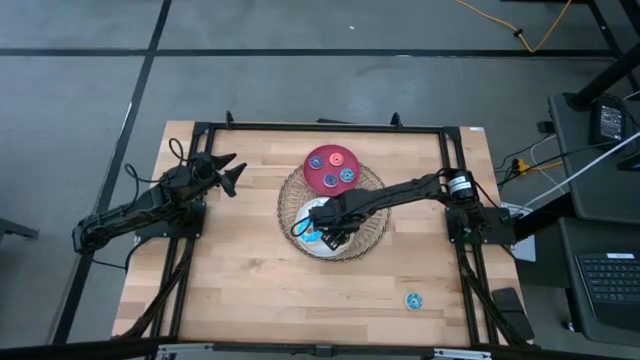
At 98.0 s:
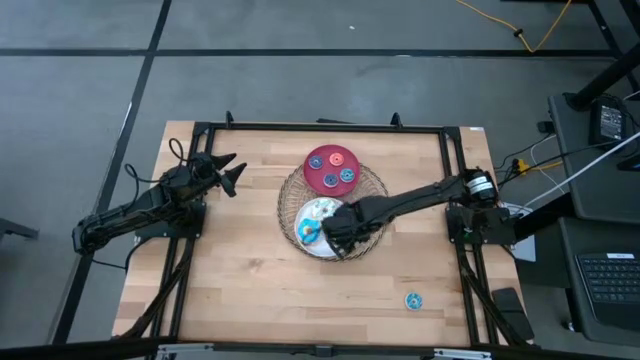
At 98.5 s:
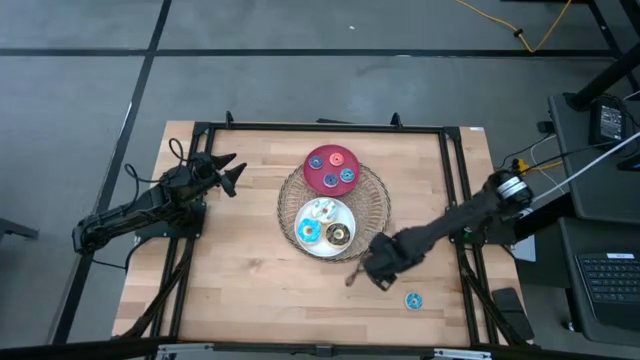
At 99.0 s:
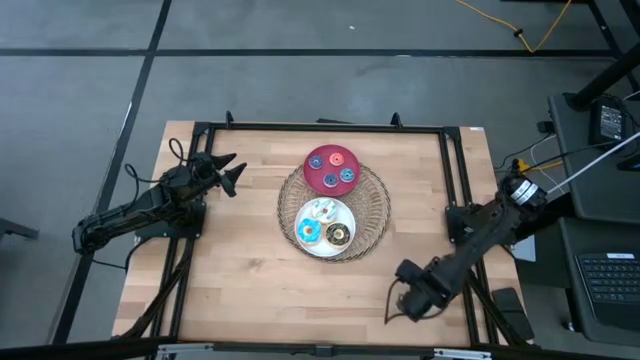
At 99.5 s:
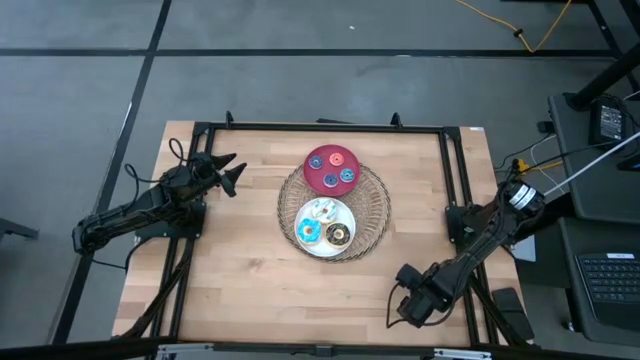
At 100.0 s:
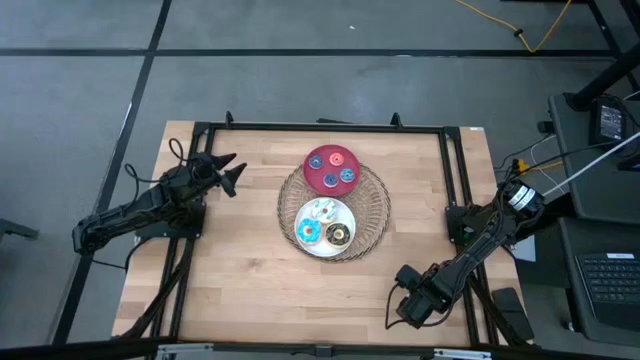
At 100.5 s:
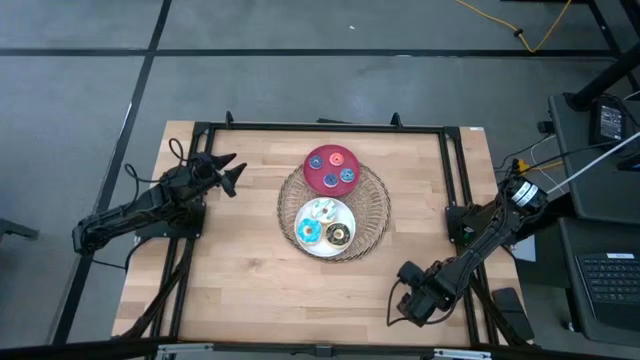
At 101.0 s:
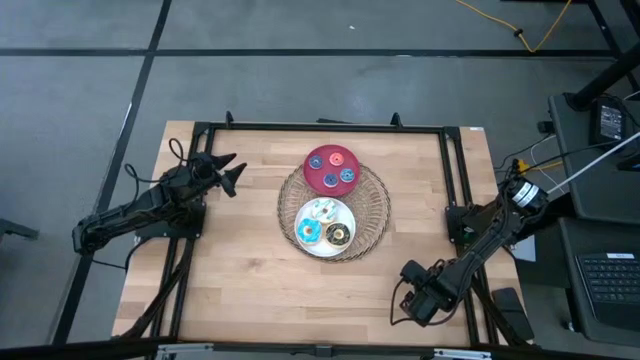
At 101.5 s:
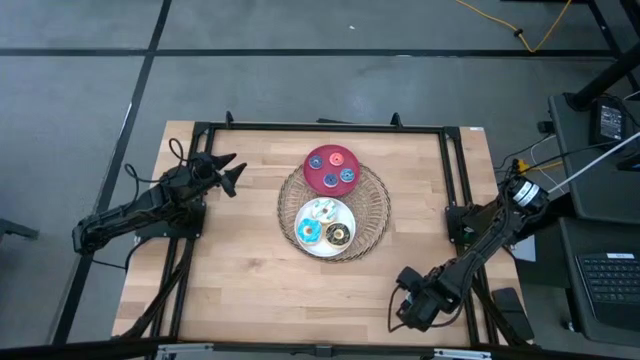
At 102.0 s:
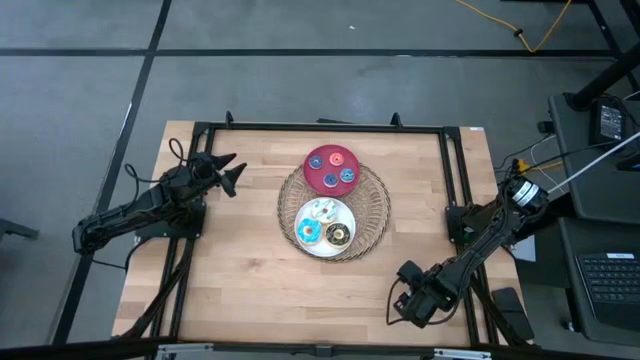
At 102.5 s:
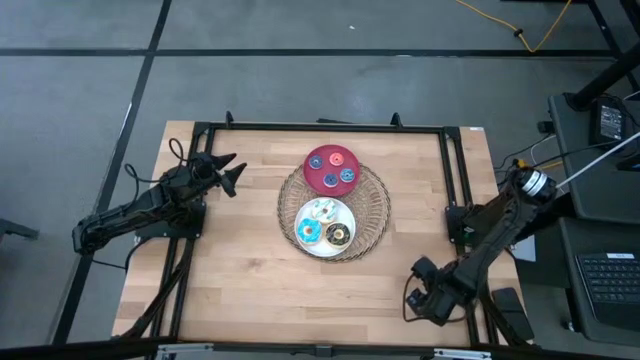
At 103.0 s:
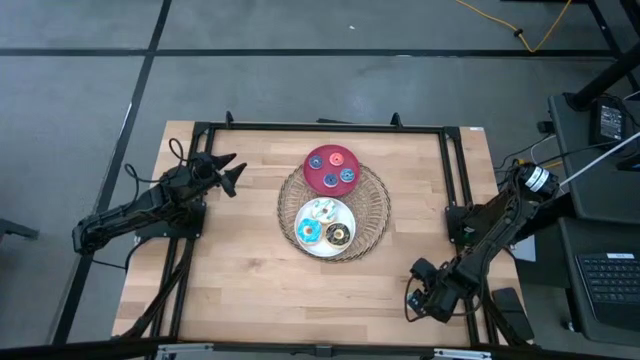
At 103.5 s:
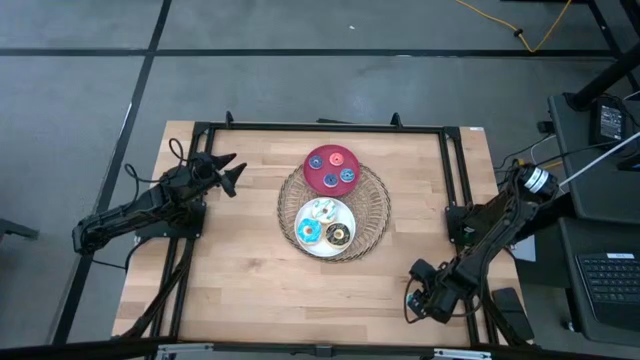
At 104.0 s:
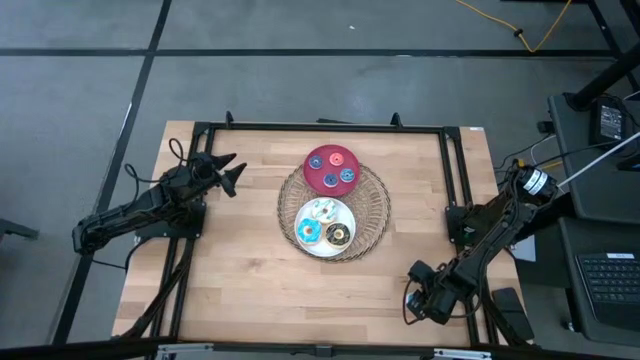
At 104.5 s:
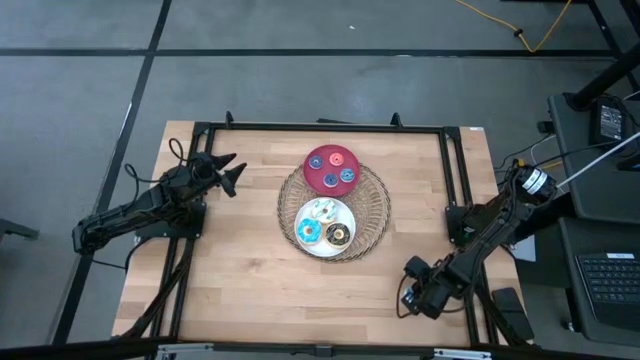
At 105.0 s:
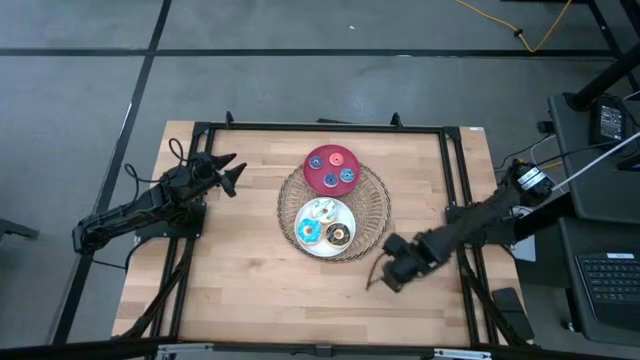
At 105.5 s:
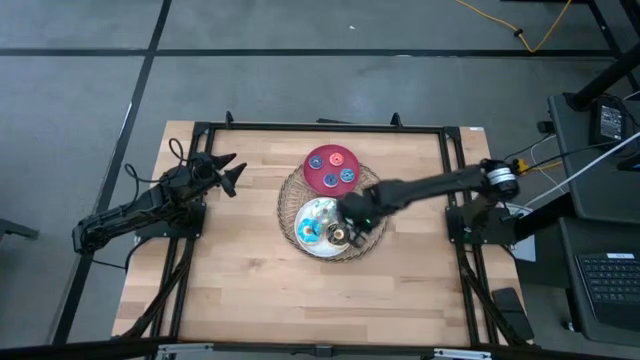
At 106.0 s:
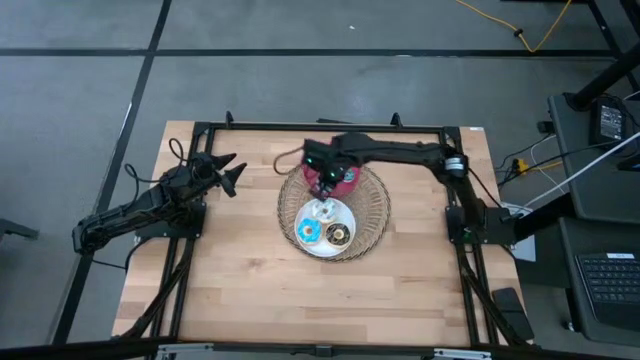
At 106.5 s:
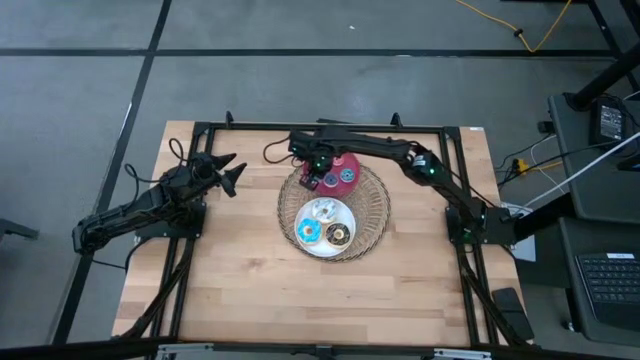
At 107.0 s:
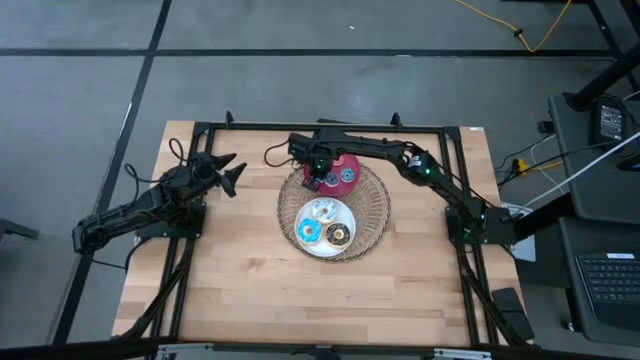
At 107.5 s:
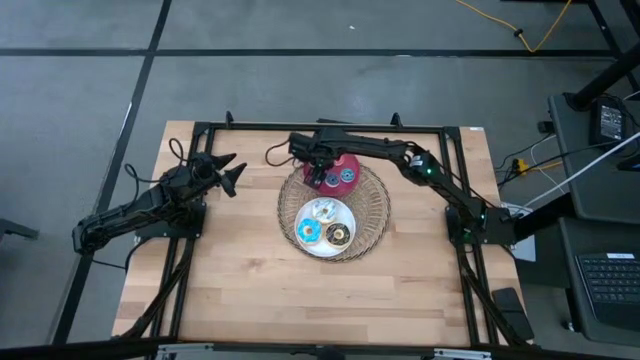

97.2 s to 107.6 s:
Task: Pick & Place donuts
Put the small light blue donut on the red plate

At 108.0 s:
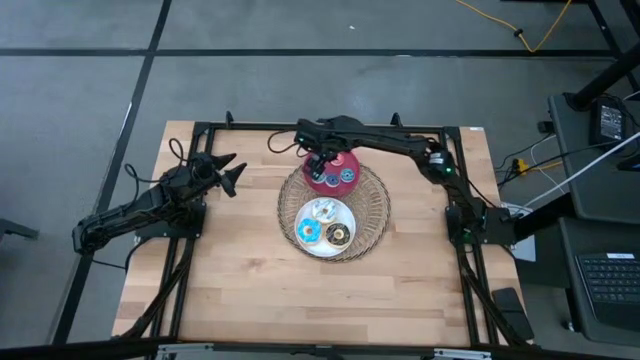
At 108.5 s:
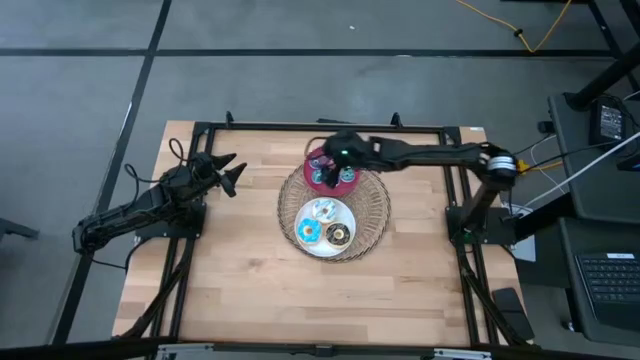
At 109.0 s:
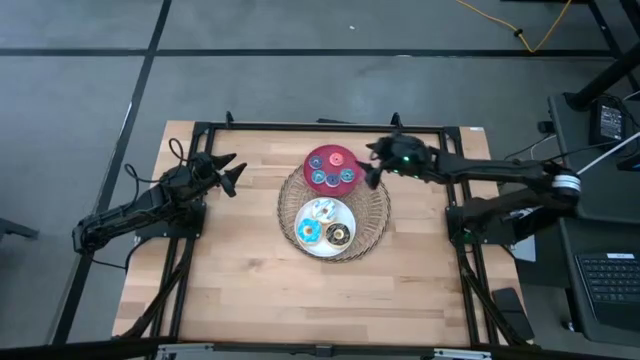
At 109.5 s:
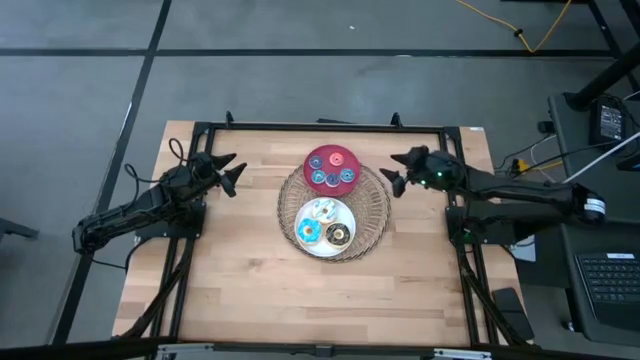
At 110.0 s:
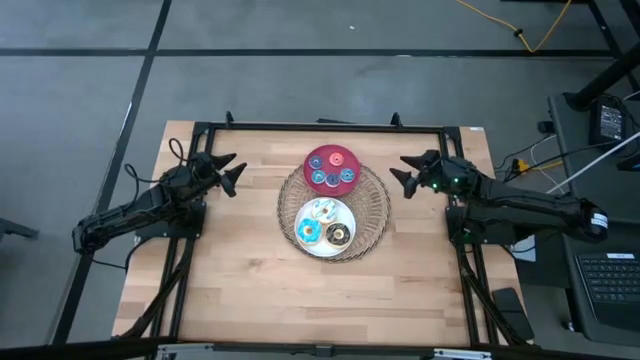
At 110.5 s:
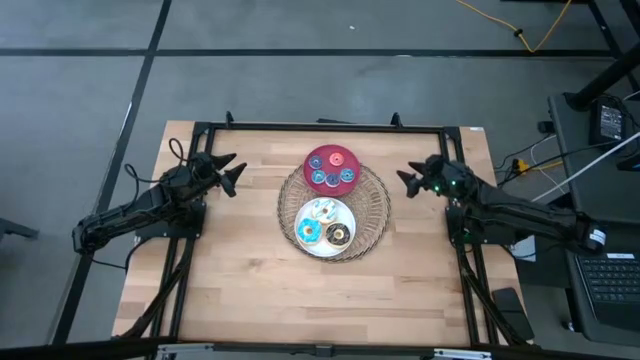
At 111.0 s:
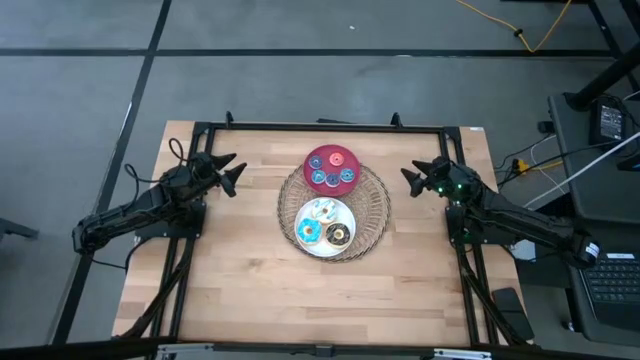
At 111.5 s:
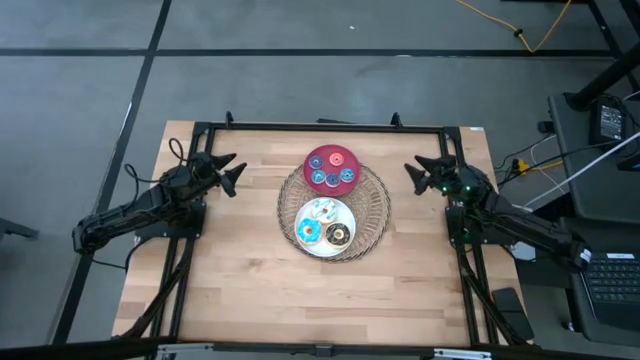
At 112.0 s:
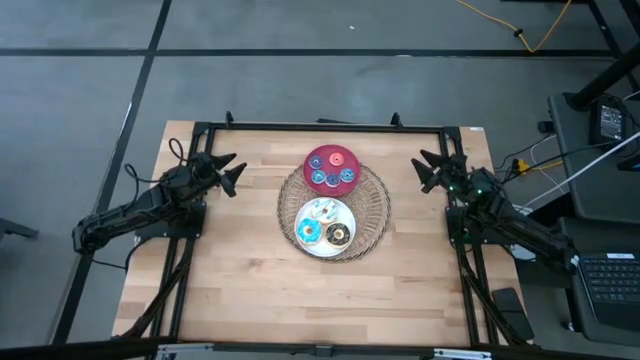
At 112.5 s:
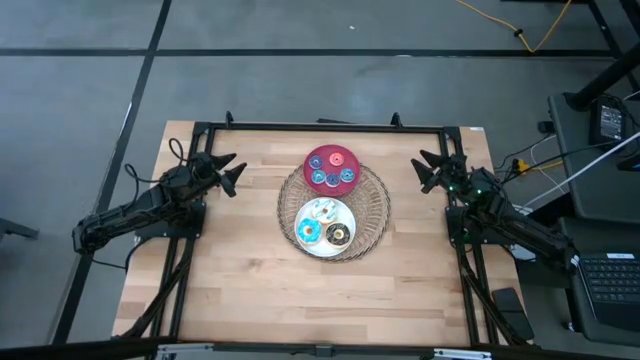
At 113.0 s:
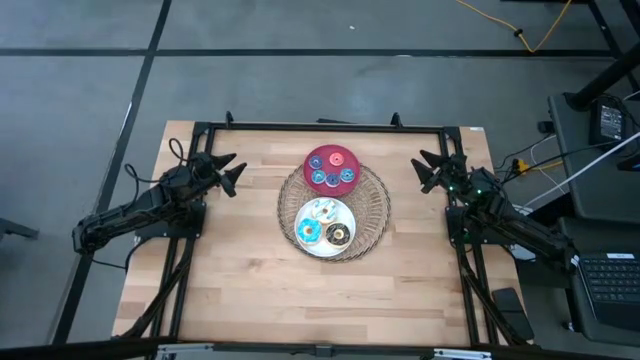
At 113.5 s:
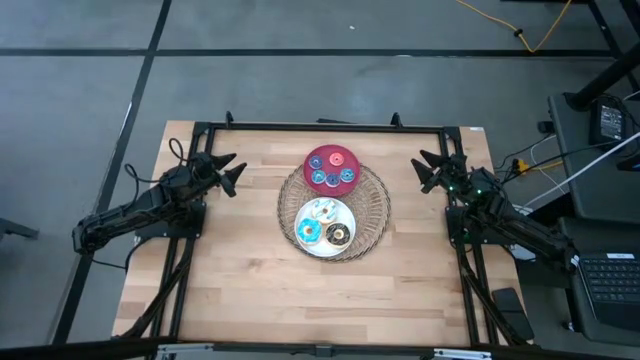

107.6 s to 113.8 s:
Return to Home Position

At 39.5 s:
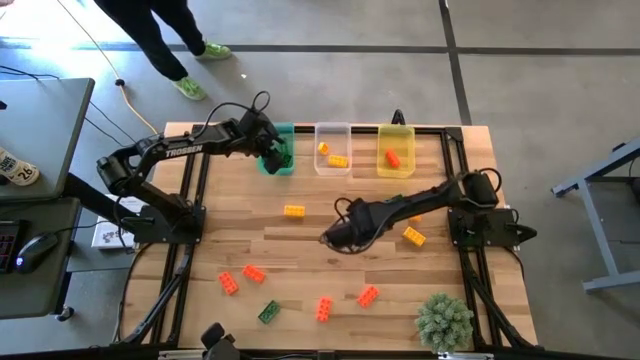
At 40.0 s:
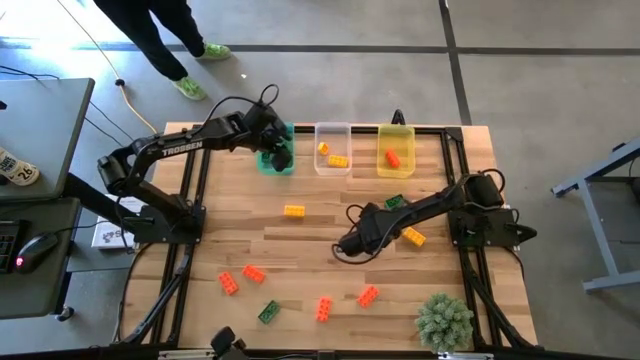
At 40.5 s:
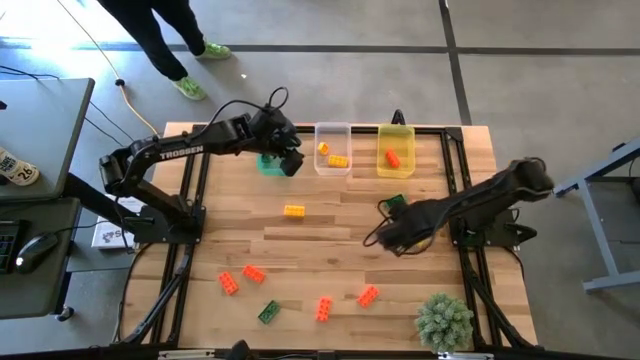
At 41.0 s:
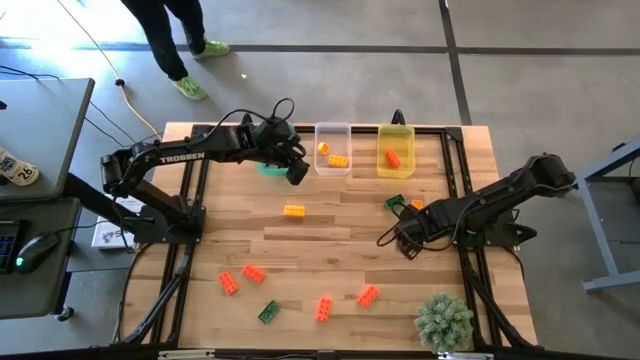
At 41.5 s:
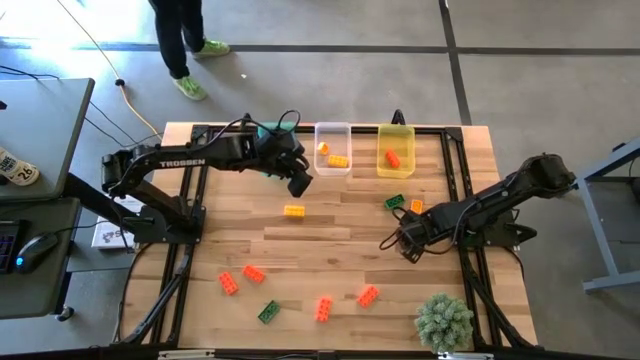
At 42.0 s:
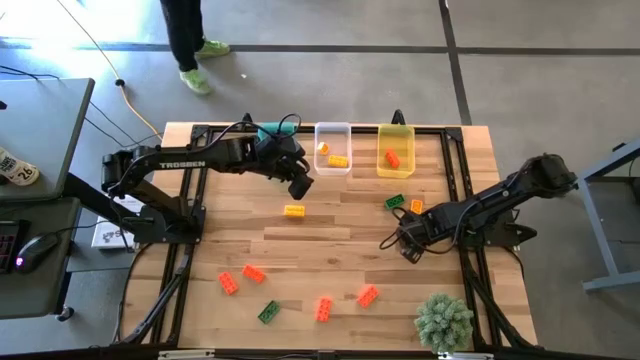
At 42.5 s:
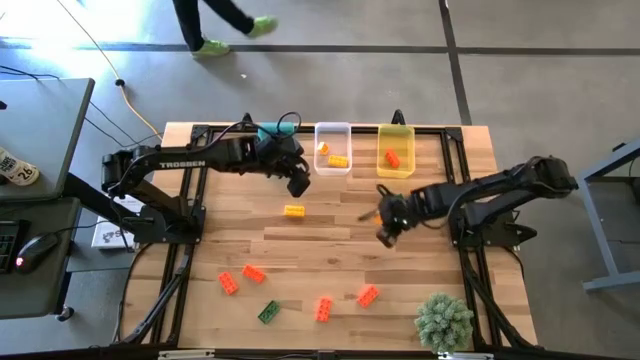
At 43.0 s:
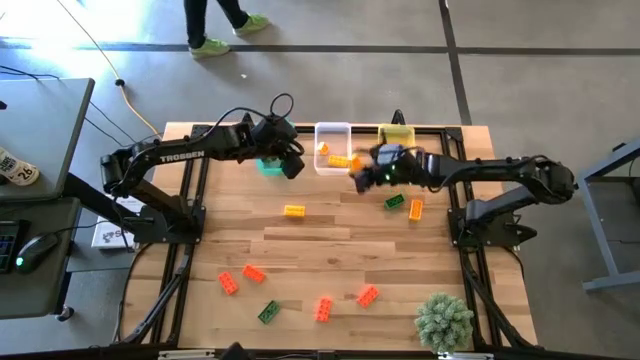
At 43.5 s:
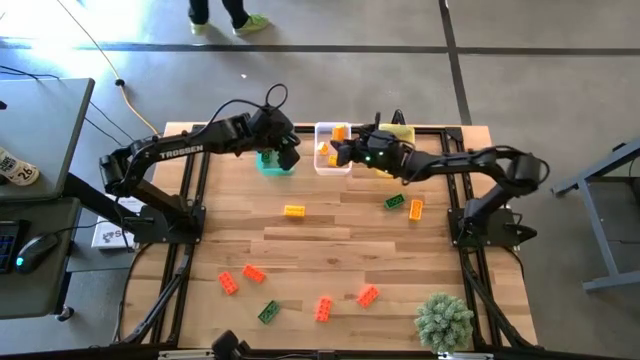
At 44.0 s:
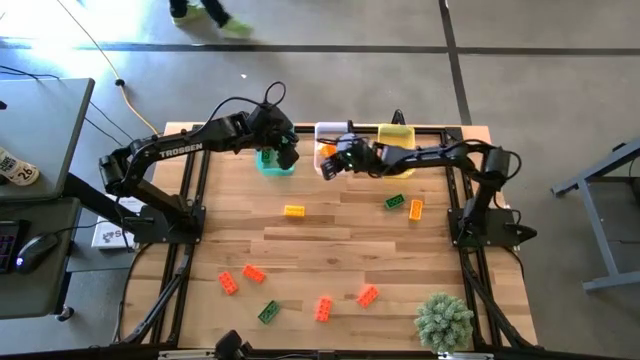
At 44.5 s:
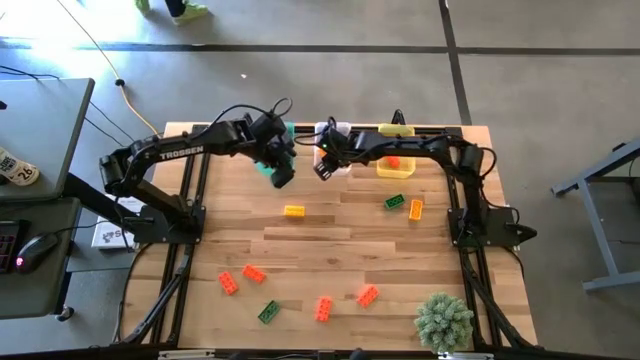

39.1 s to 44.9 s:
Task: Sort & place blocks by color
Put the yellow game piece into the white bin
